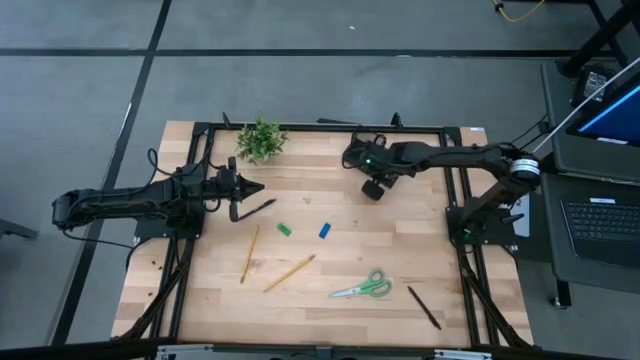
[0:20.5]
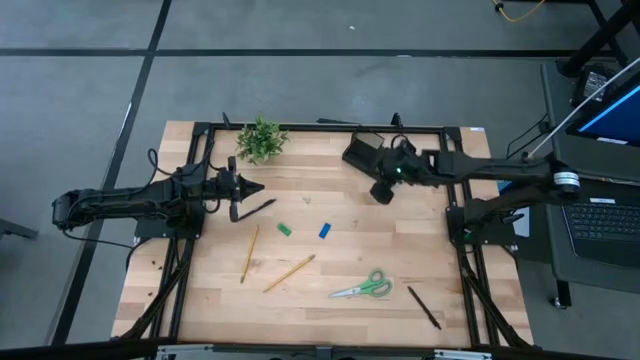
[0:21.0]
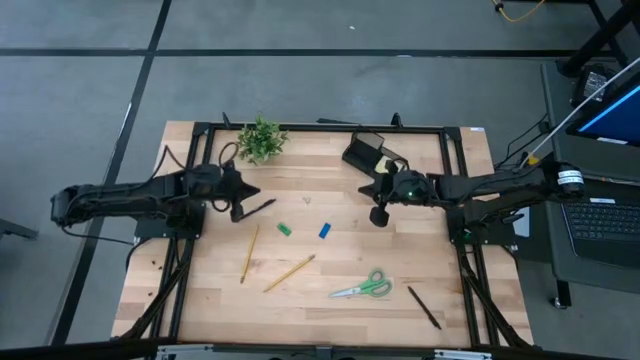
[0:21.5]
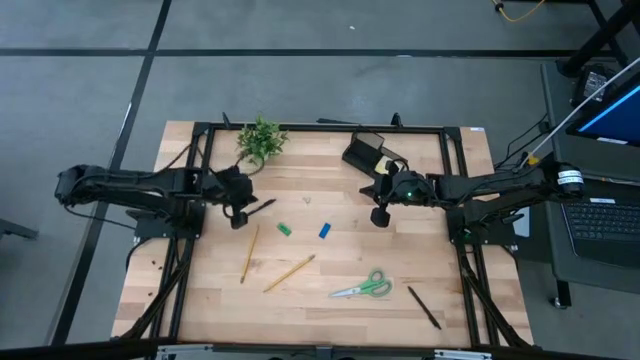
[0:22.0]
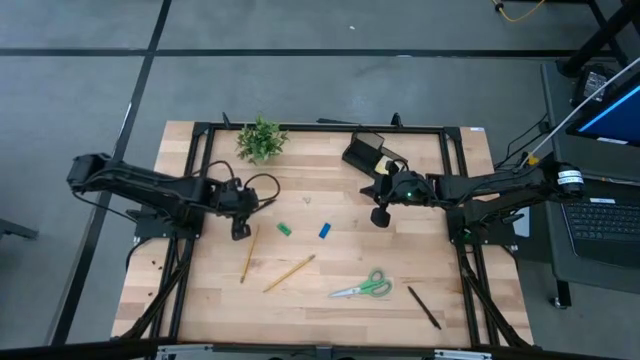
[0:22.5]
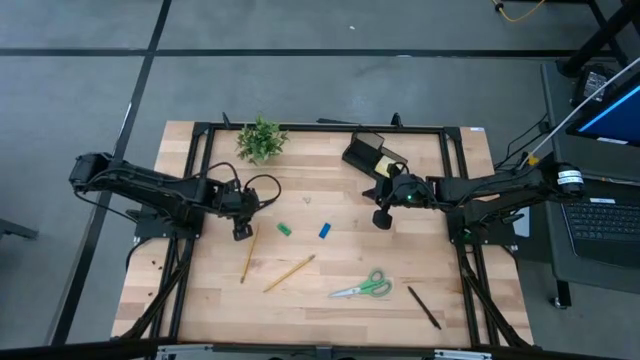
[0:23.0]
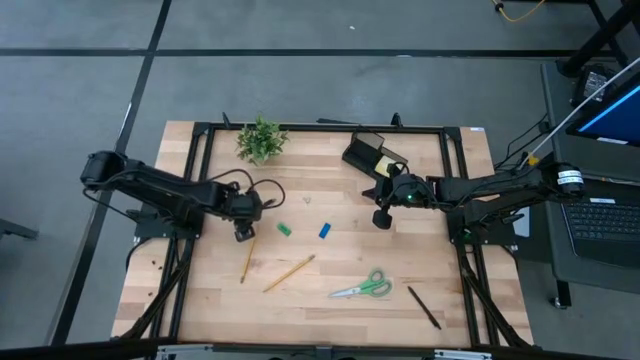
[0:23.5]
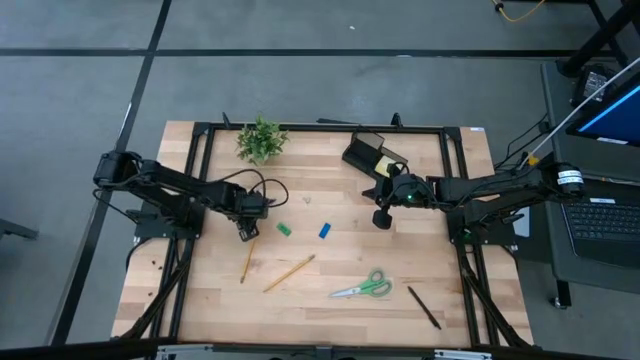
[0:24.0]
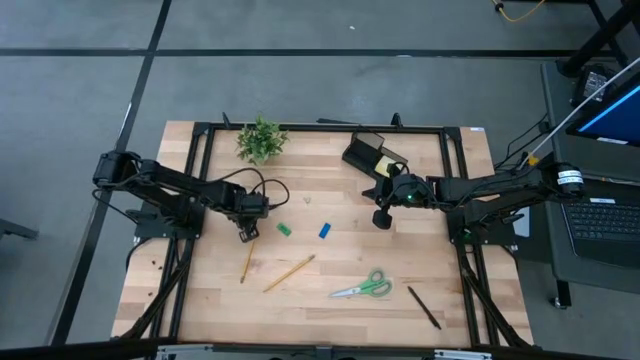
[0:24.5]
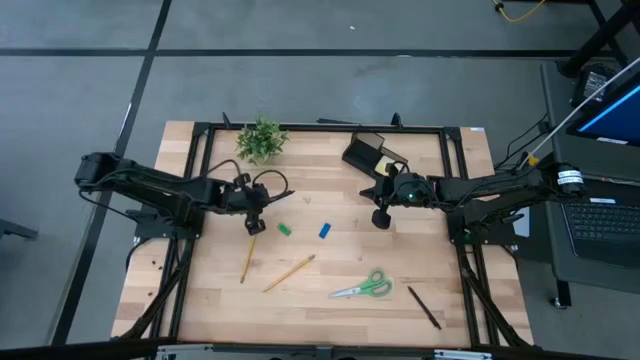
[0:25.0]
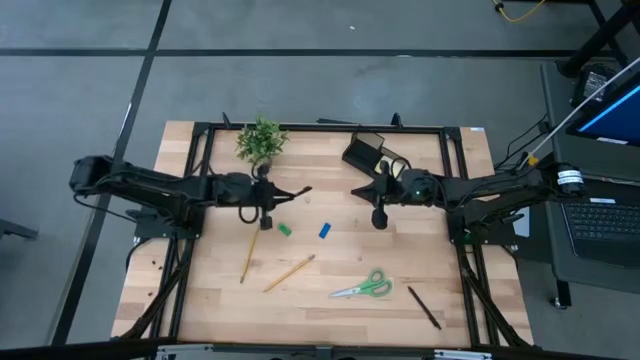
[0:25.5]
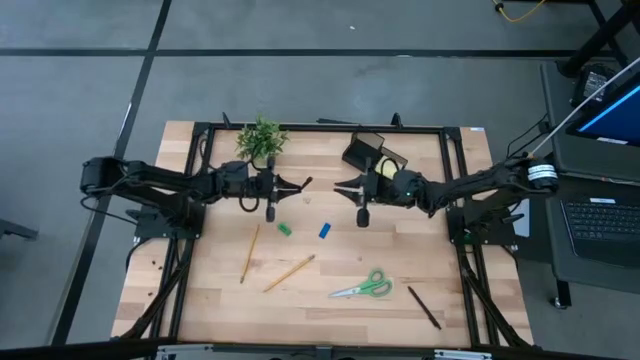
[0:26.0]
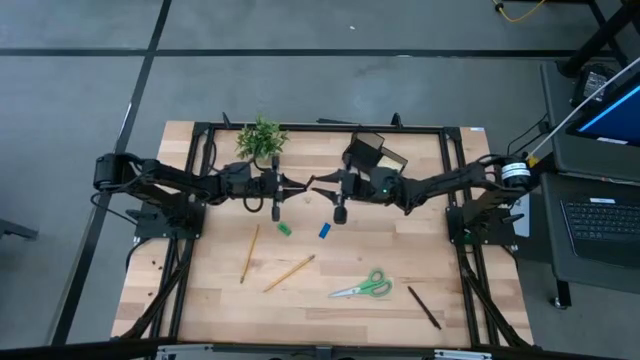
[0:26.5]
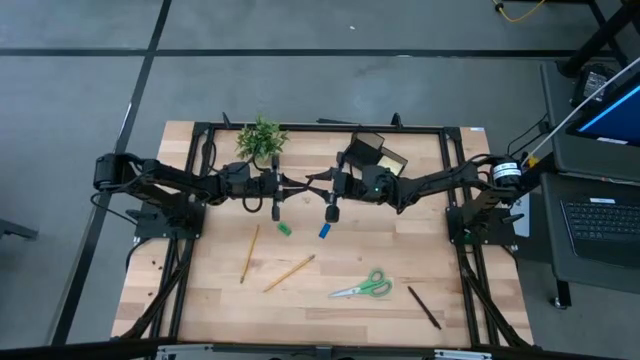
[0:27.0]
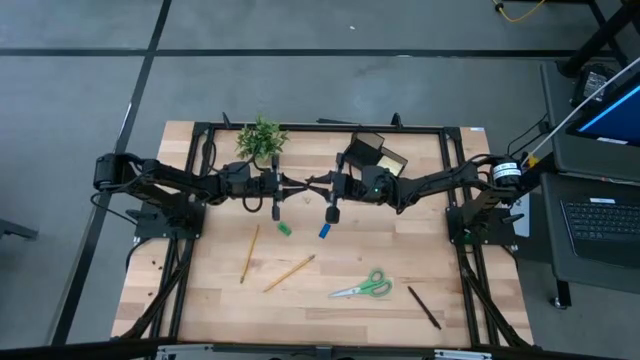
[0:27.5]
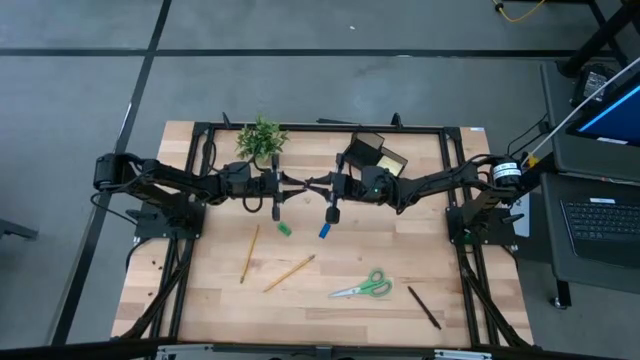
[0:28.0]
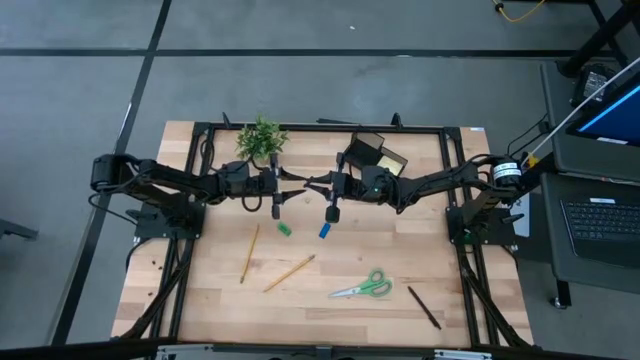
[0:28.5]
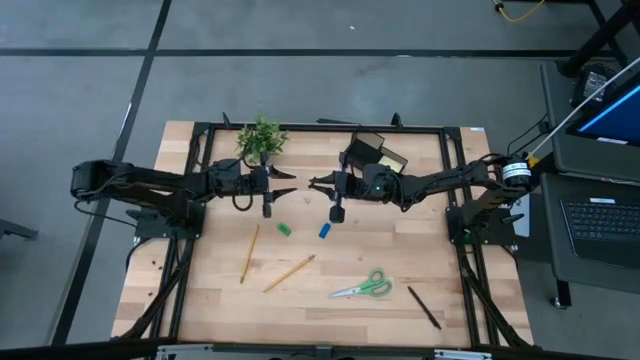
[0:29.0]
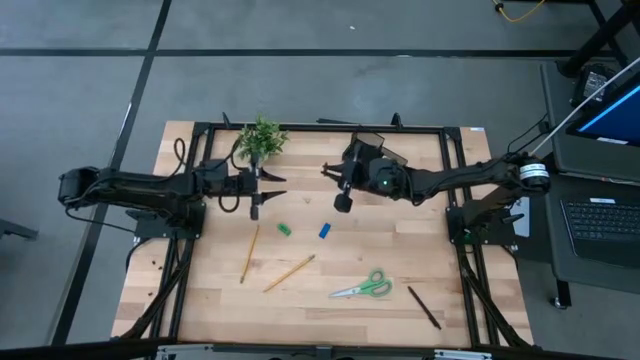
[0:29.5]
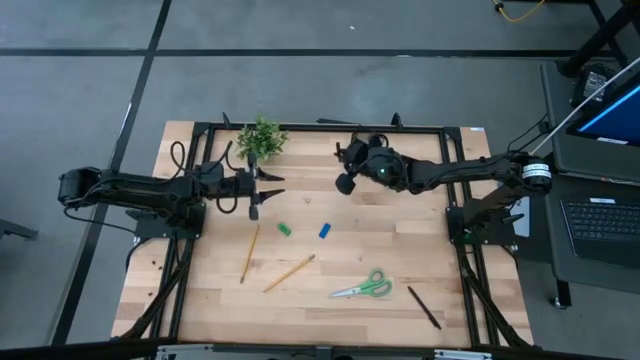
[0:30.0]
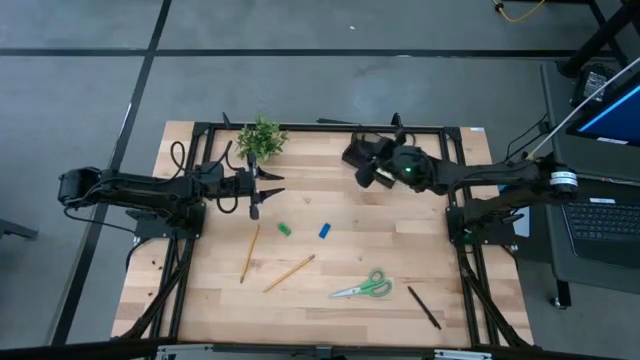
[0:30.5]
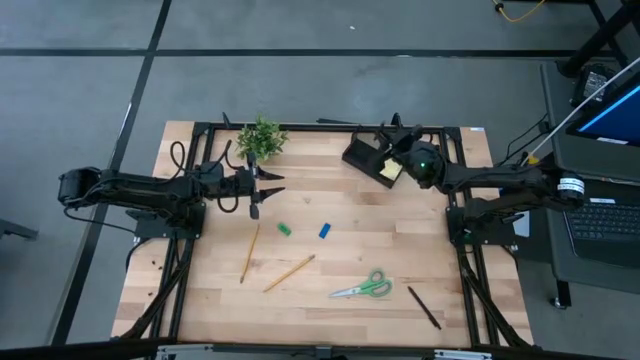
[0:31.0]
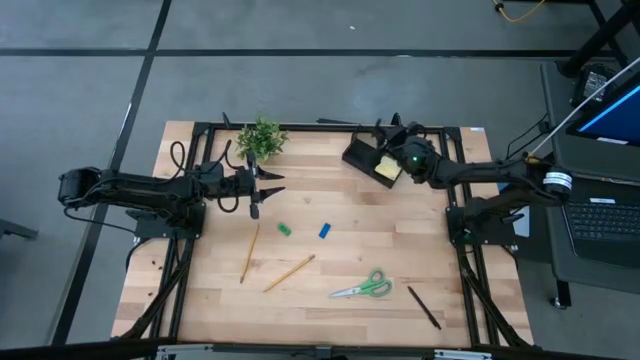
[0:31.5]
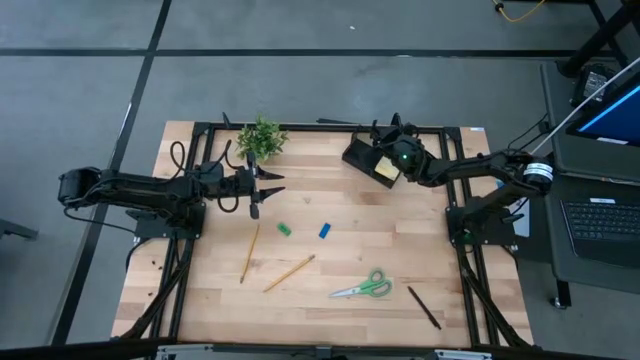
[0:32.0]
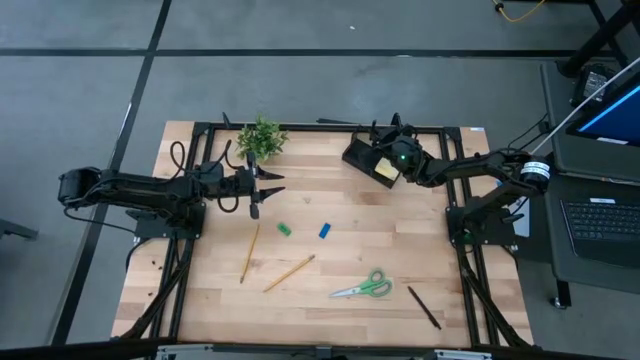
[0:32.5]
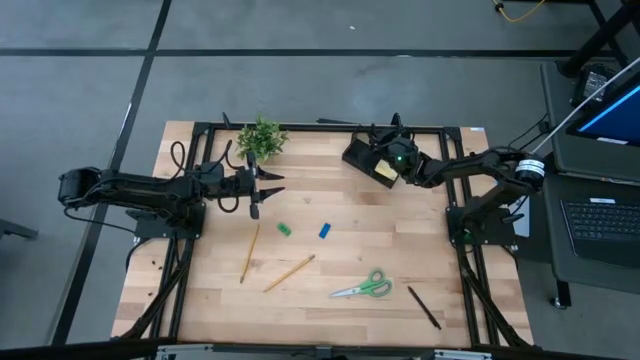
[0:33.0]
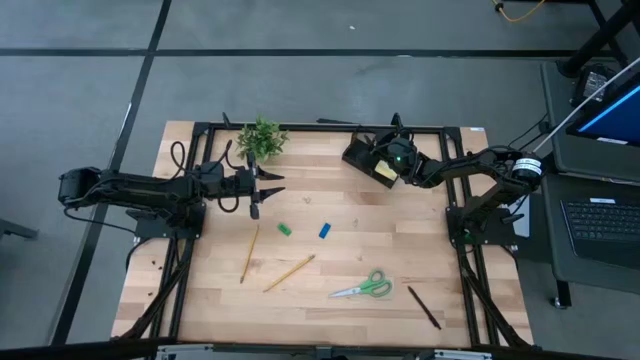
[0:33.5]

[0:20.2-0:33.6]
Task: Pick and place office supplies into organizer
Put the left black pen into the black desk organizer

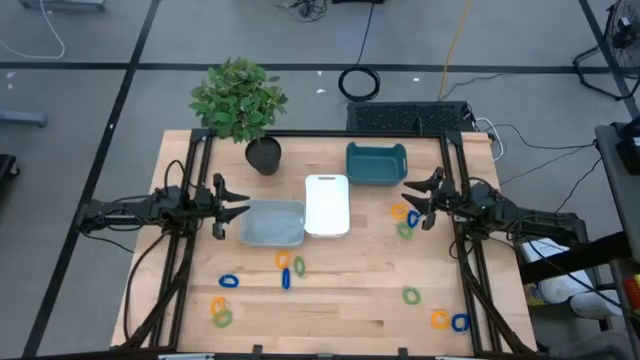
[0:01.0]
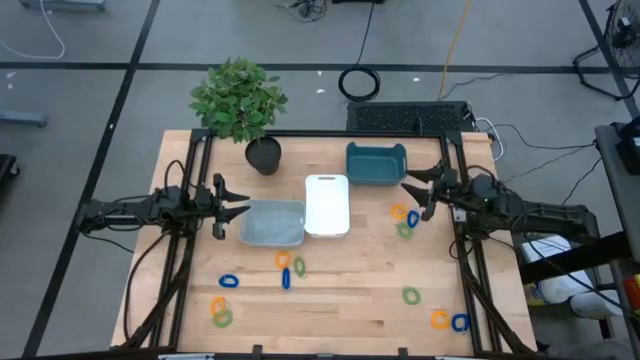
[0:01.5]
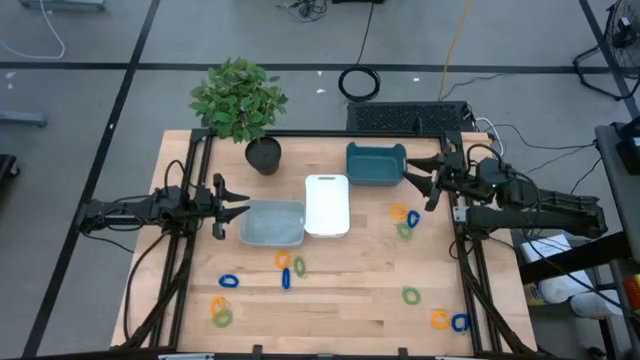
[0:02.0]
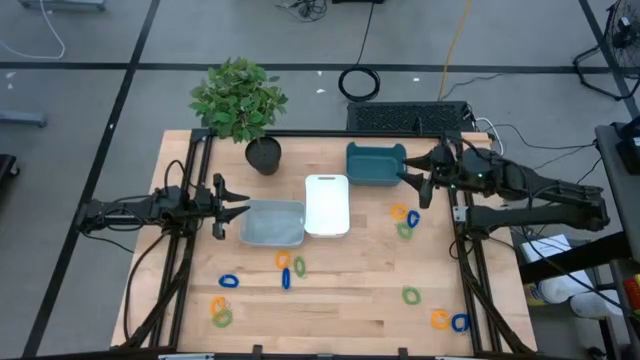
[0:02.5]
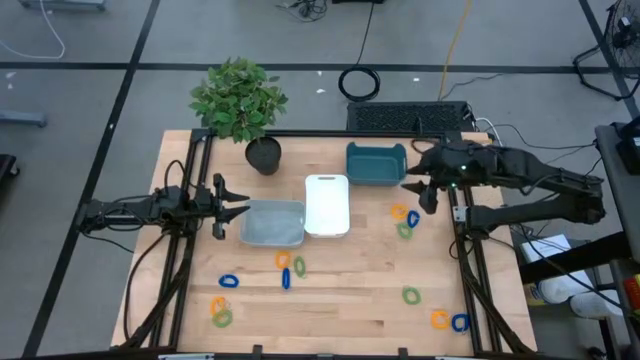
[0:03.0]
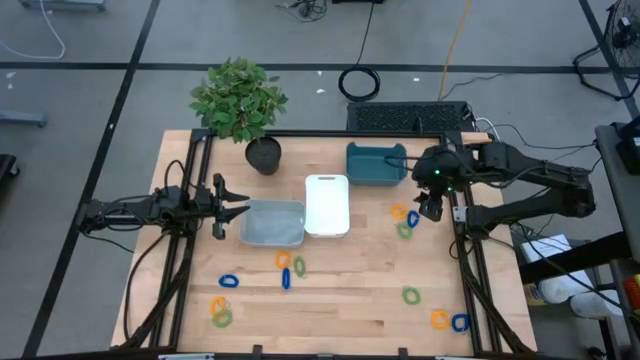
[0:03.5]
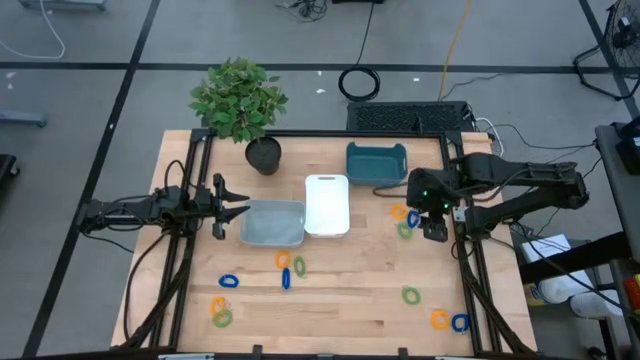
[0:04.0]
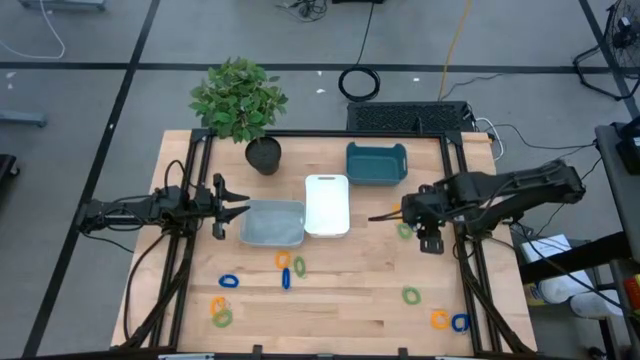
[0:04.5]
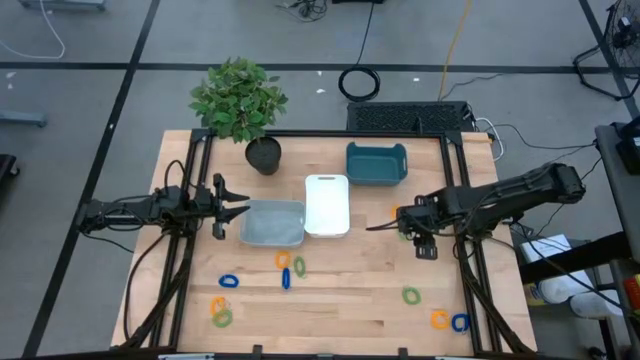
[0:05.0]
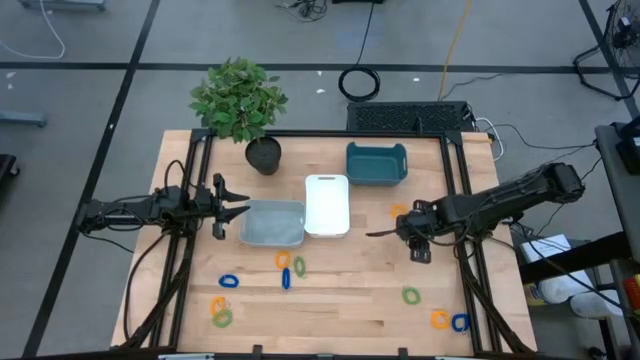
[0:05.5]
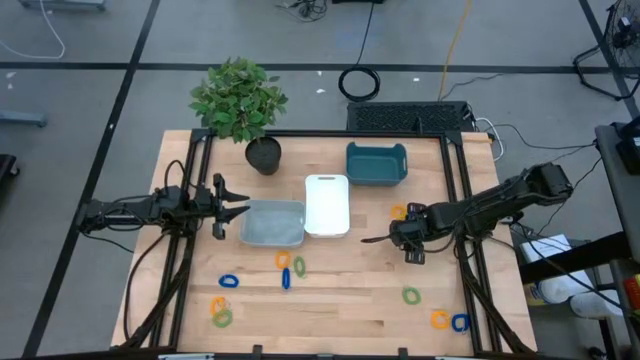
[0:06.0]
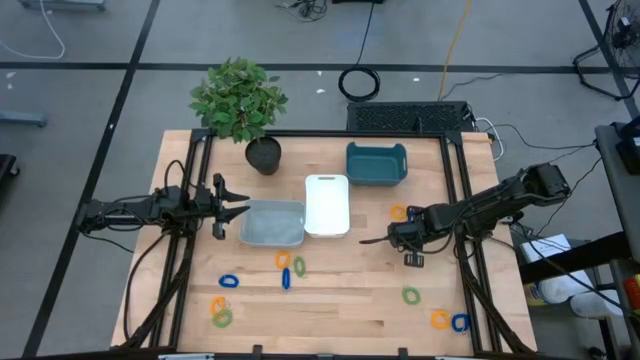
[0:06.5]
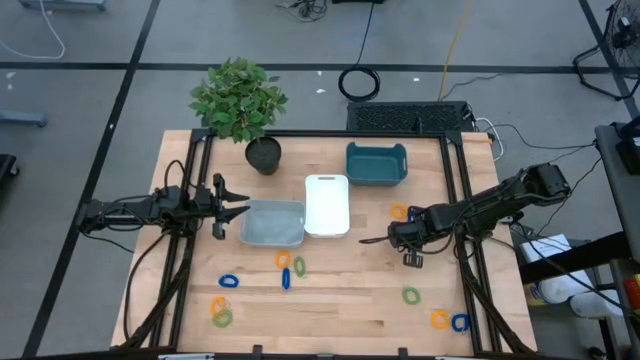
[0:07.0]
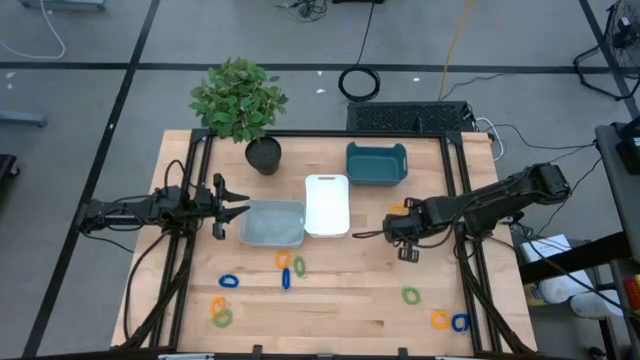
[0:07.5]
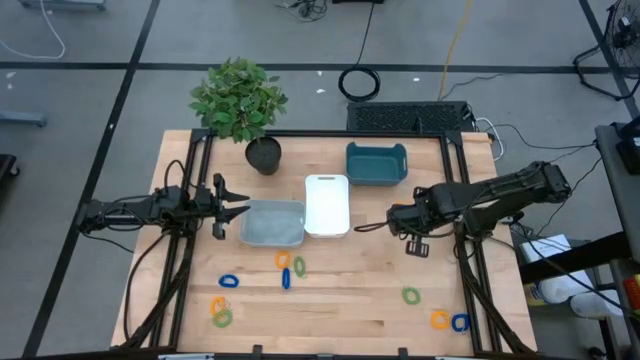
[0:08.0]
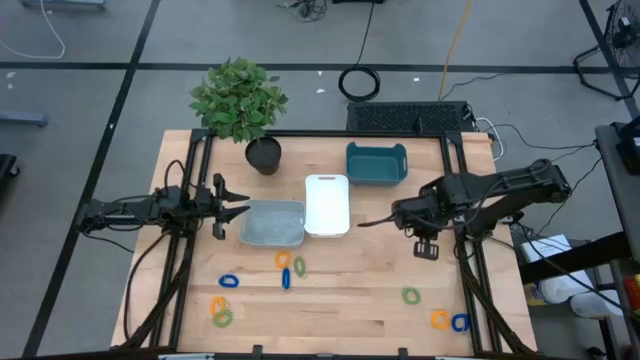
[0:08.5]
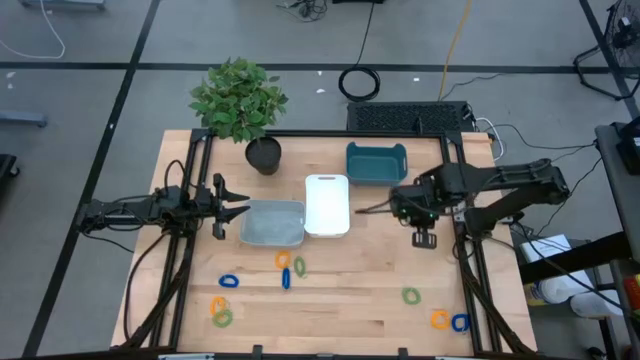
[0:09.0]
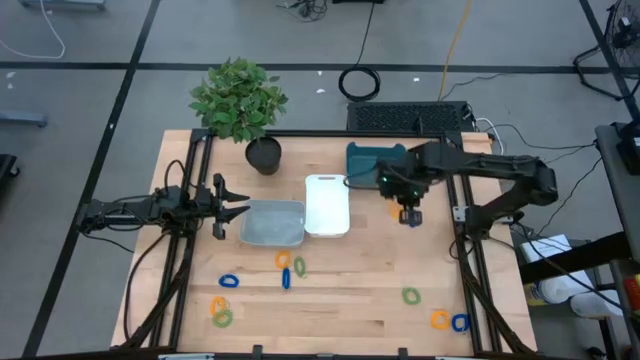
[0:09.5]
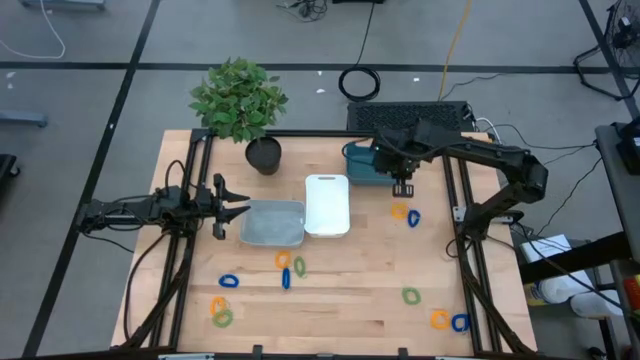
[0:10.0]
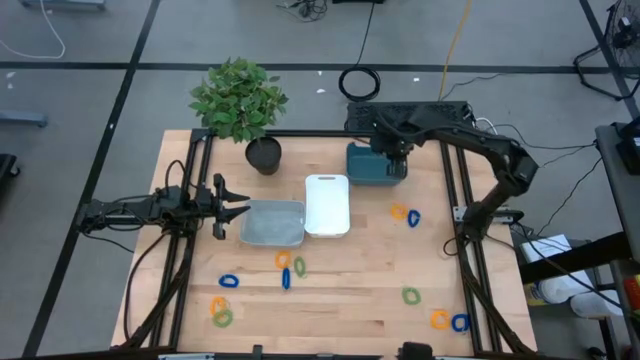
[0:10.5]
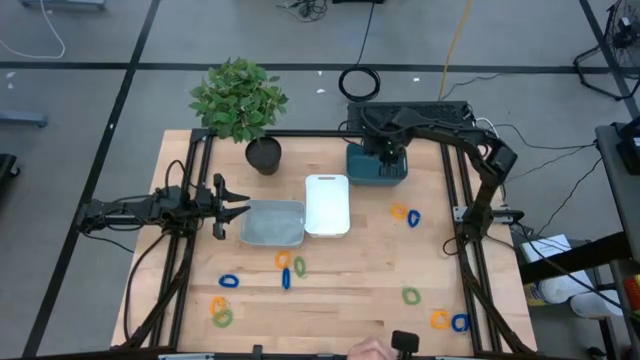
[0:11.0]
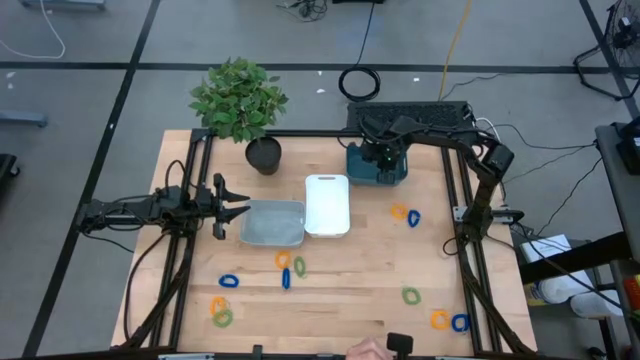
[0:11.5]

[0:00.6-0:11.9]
Task: Sort spring keychains
Put the green spring keychain into the blue bin
